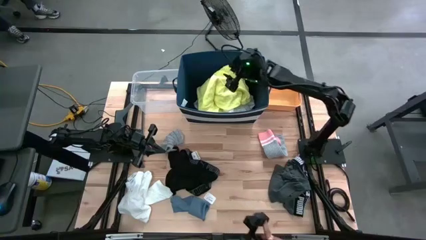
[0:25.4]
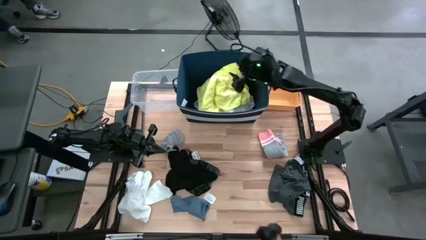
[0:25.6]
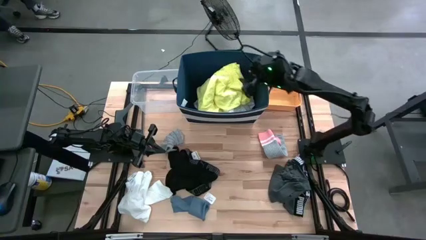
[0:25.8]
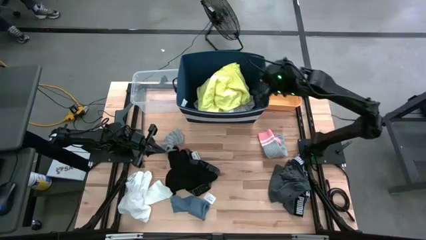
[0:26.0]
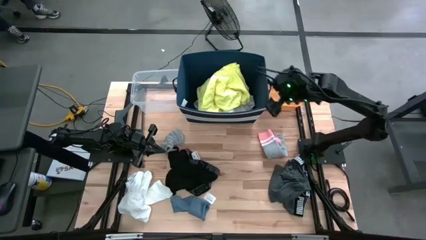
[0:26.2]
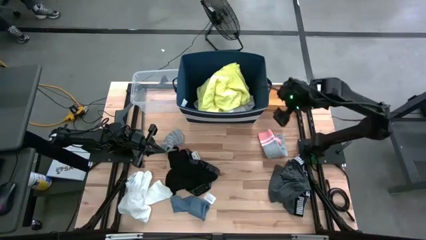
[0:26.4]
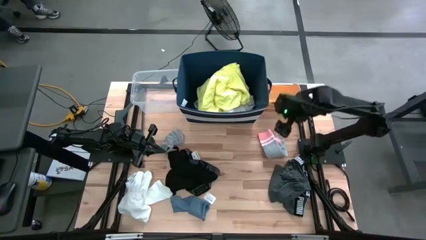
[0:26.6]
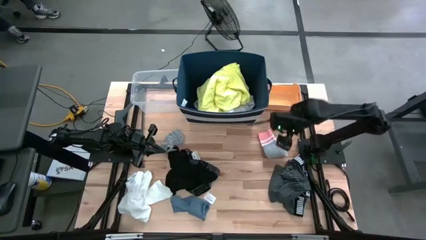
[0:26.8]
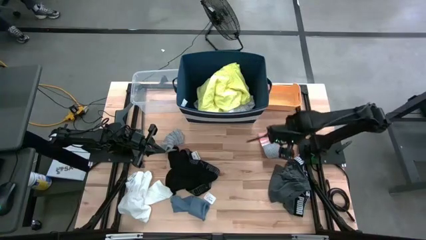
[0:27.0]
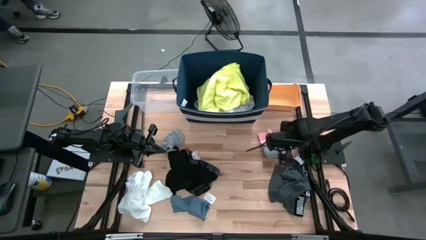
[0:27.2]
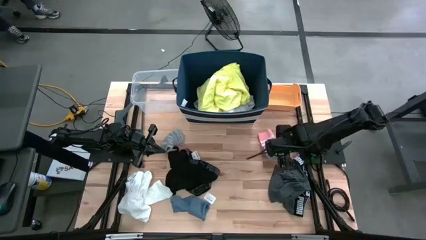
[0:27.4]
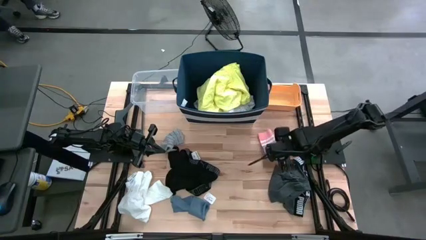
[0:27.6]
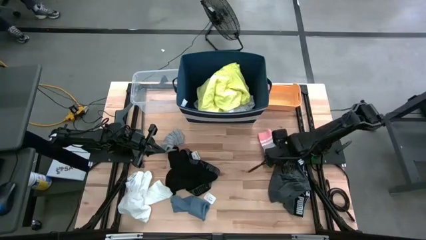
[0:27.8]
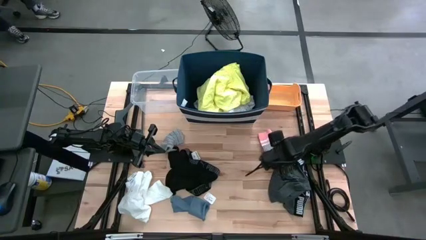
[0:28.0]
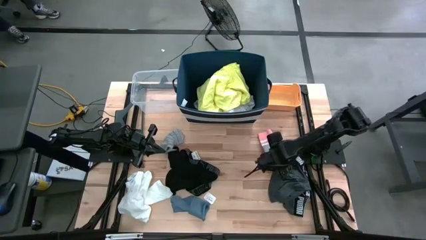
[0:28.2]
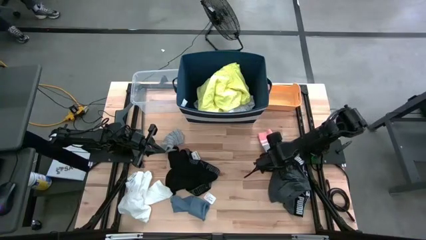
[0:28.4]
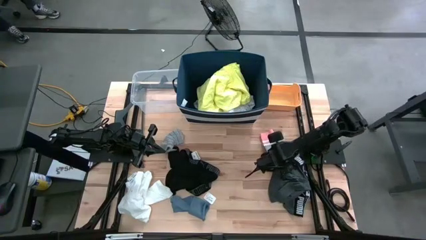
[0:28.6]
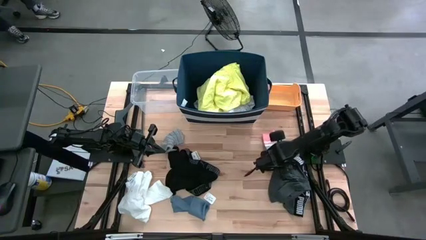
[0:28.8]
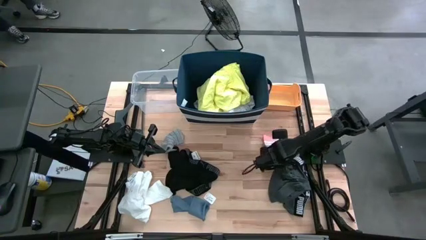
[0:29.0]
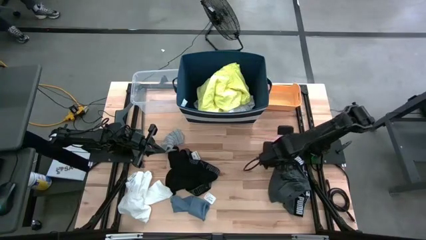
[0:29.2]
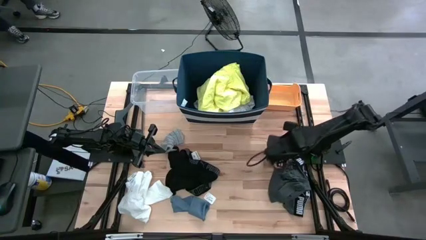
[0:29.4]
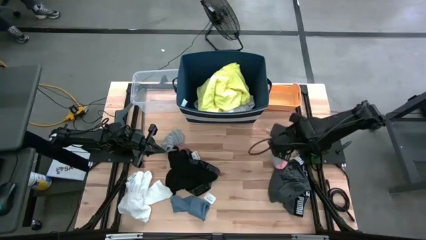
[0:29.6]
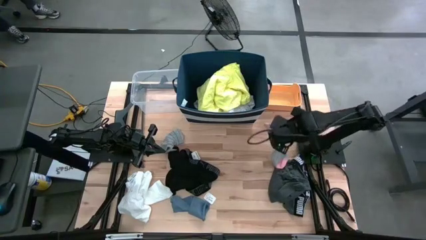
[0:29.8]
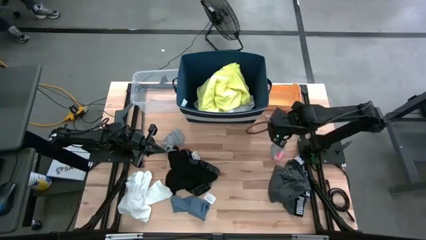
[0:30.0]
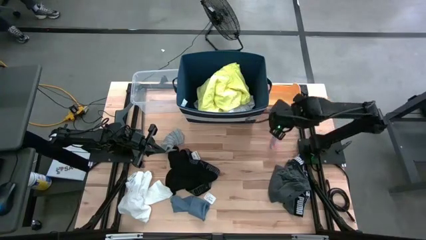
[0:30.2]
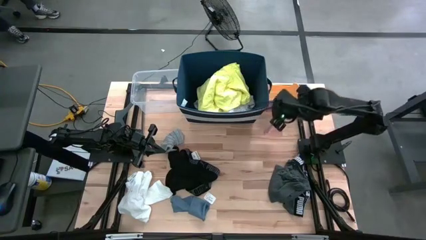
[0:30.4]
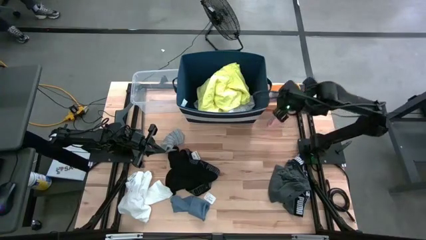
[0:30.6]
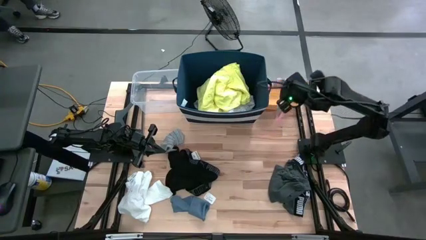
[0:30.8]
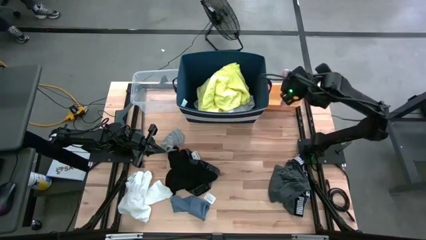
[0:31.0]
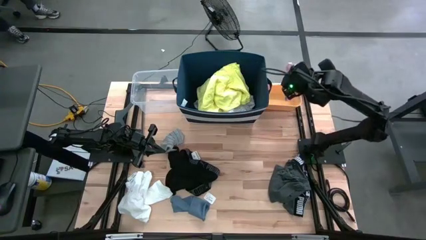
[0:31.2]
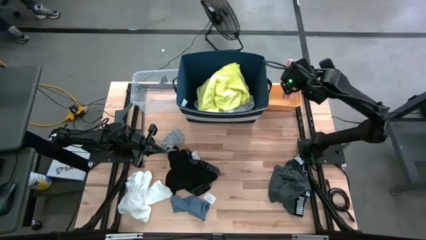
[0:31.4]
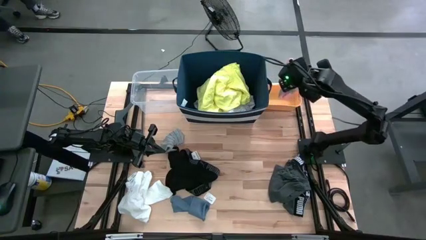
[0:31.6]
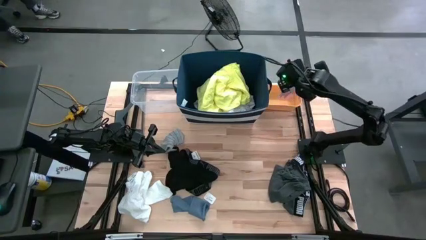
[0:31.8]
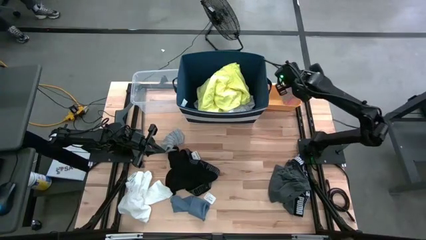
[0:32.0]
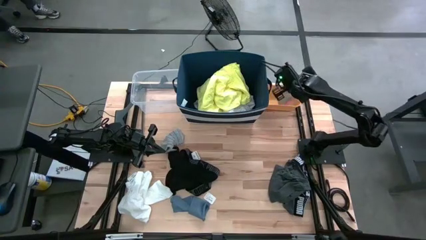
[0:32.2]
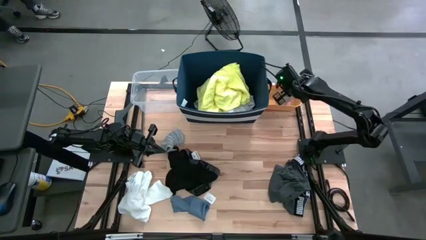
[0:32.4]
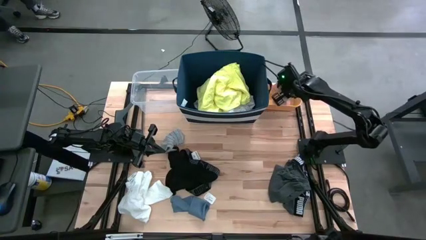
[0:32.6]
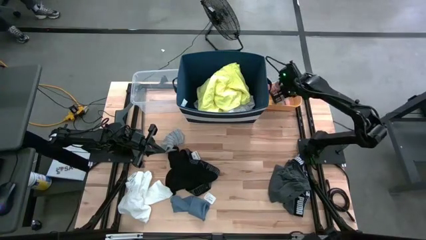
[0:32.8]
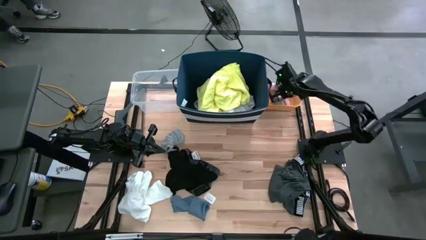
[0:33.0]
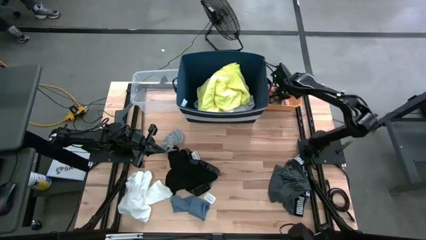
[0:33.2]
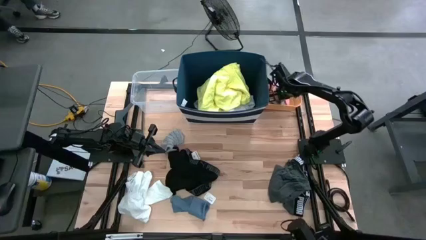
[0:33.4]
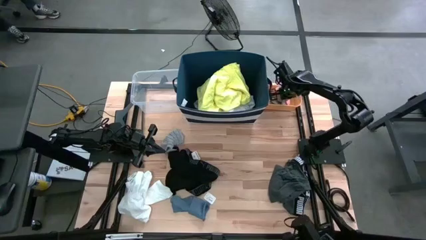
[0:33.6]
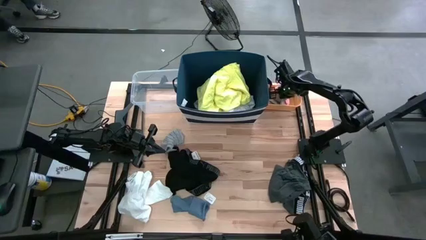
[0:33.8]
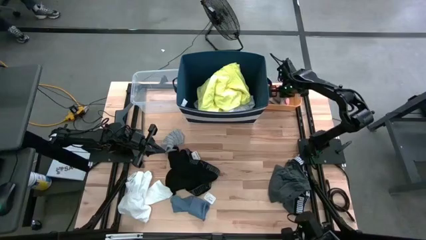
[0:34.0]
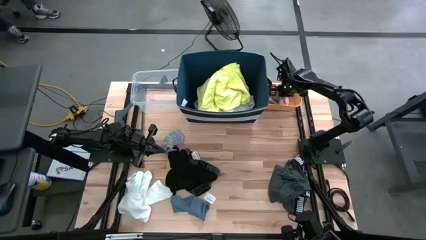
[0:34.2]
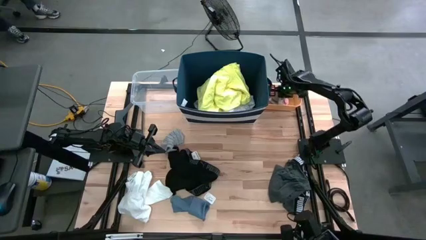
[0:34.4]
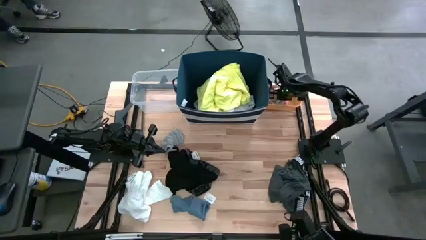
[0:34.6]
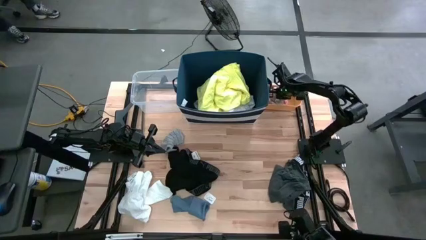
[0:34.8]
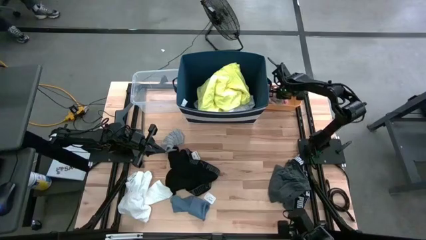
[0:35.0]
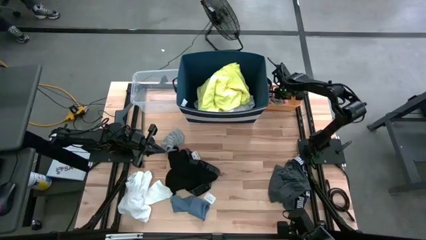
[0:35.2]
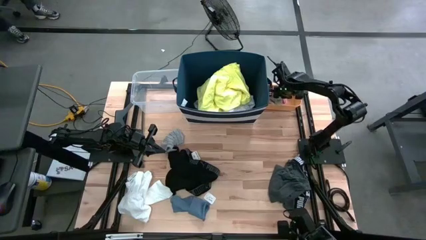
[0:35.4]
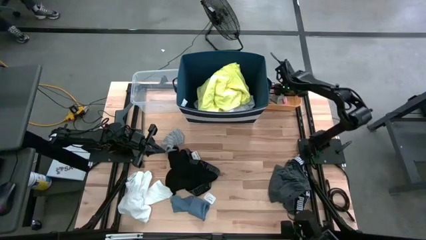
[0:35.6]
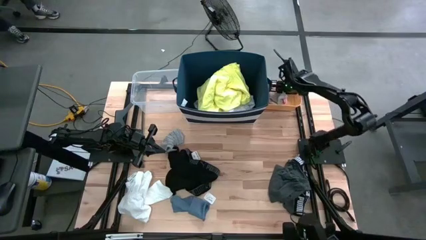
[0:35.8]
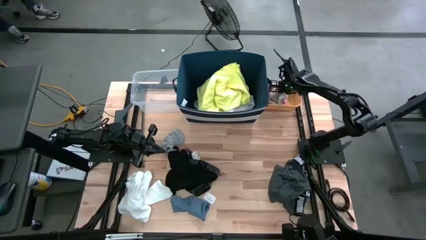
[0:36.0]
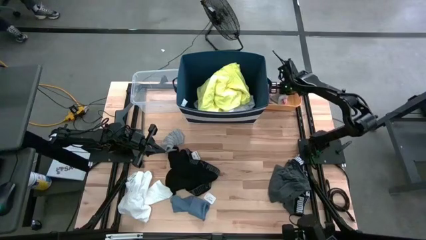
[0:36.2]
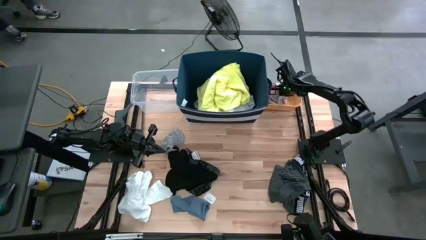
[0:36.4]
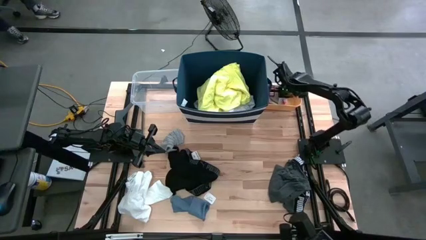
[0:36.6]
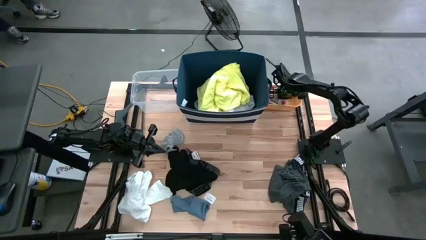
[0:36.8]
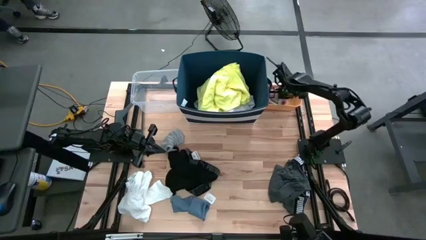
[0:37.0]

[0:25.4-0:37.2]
Task: Pick & Place Cloths
Put the right gray sock into the yellow bin

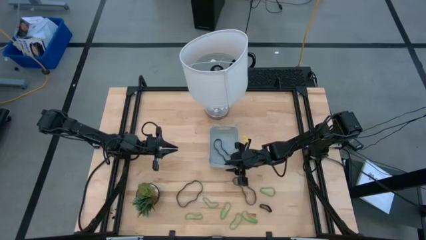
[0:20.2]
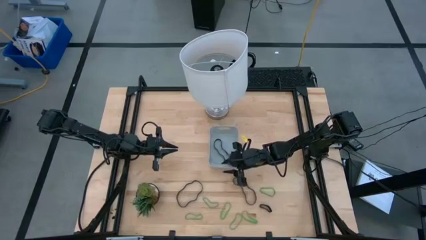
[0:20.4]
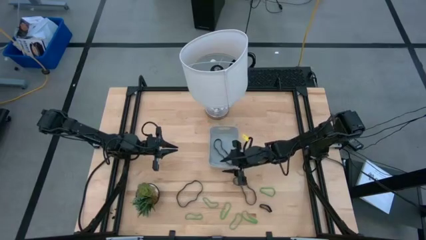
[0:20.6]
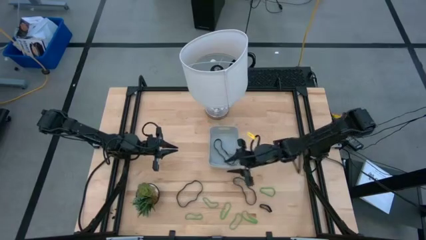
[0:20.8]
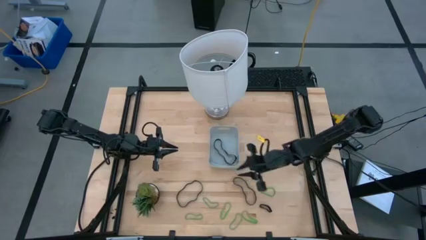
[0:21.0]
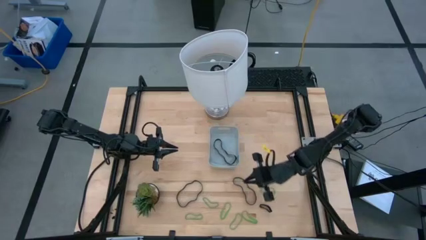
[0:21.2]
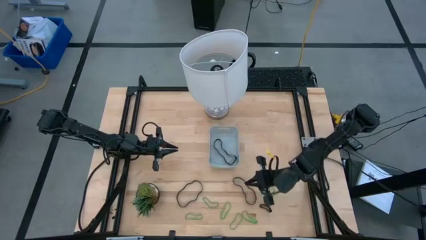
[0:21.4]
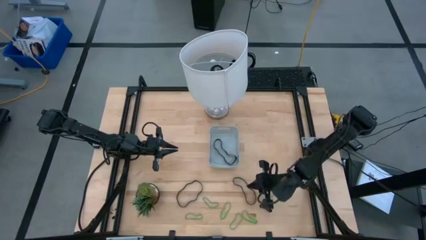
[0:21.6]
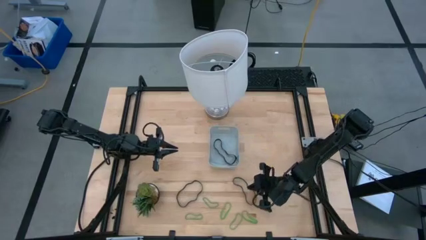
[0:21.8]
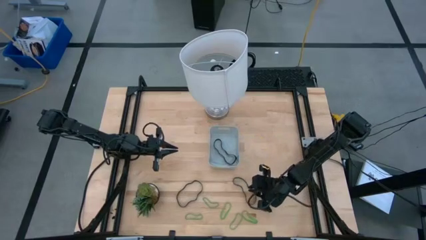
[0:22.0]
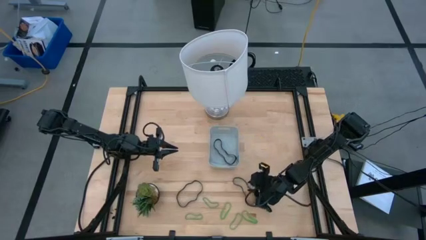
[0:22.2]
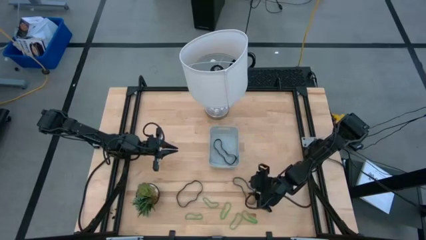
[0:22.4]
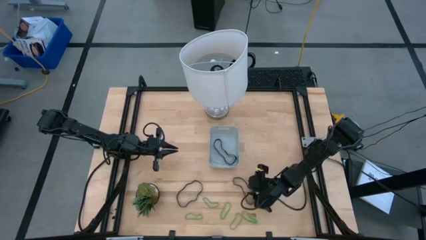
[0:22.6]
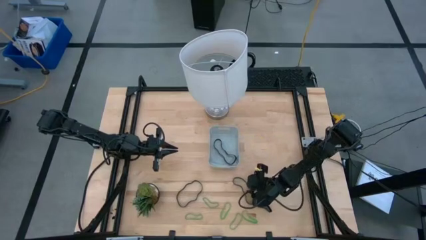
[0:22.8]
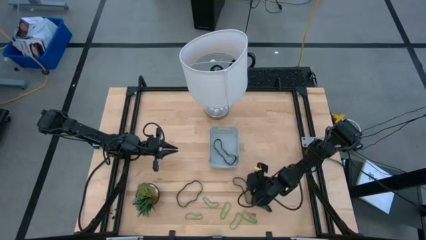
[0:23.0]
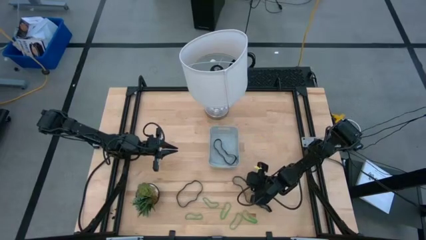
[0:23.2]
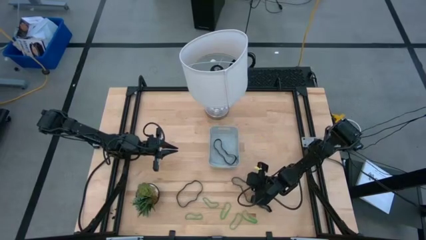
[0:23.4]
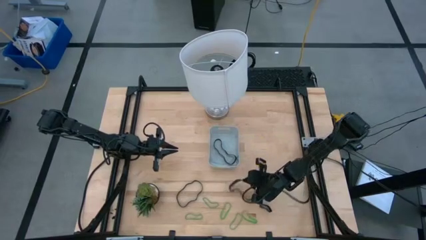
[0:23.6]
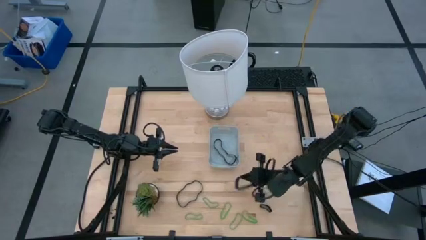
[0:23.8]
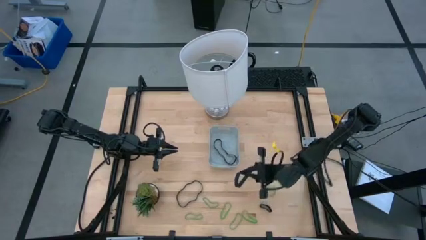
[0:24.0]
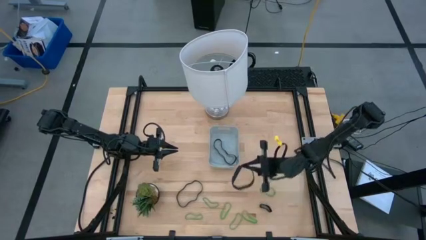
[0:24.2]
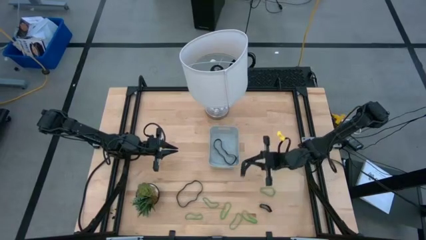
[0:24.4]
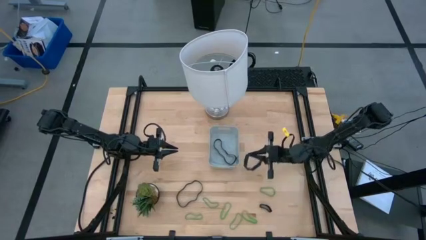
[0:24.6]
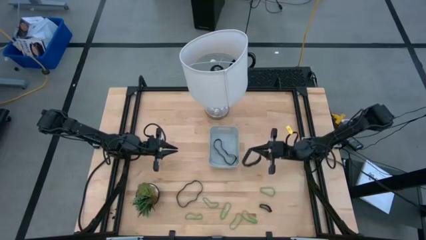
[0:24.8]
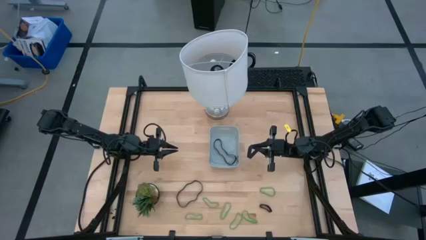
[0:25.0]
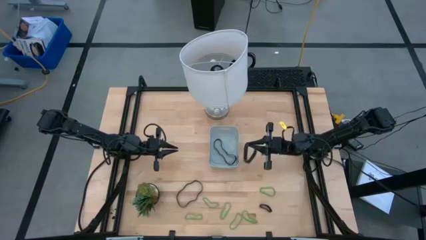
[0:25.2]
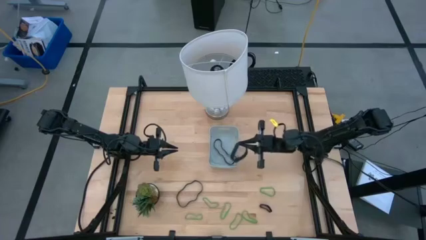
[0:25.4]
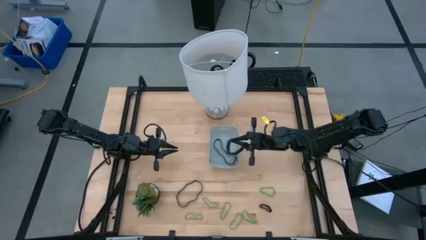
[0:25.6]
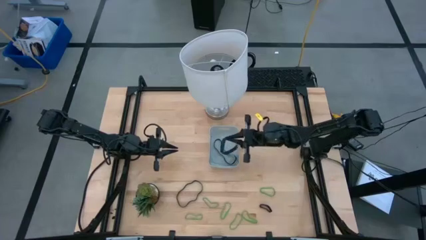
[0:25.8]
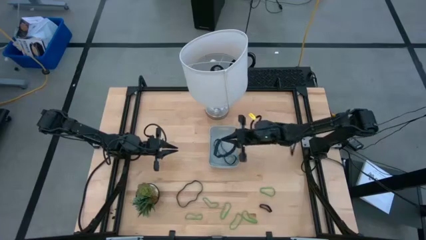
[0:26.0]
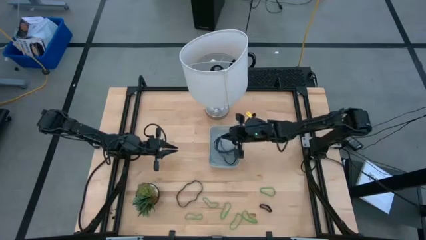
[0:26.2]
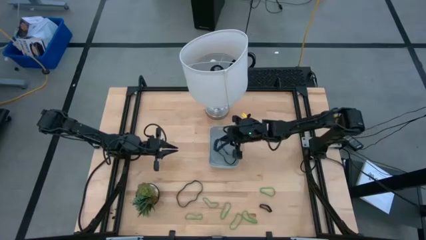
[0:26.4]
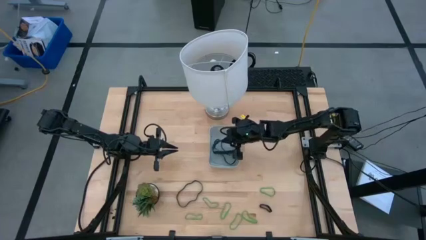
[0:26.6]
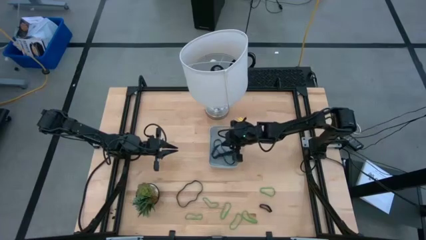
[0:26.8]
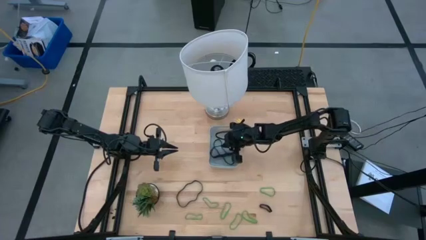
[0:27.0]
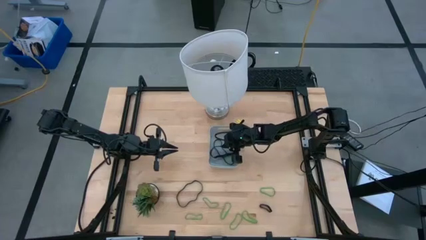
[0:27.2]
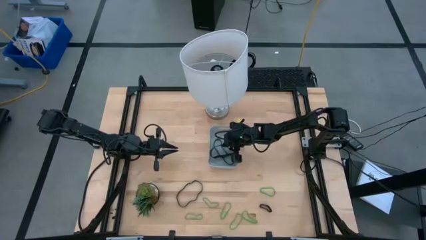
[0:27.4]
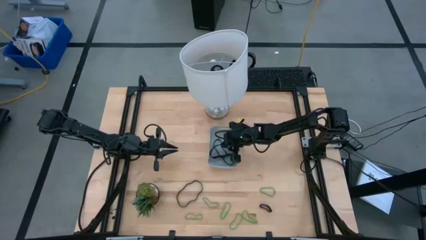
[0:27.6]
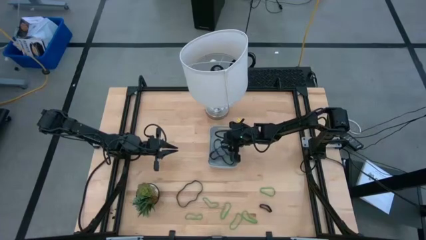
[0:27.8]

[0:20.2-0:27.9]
Task: Pick and place rubber bands into bin
Put the black rubber band into the gray bin
